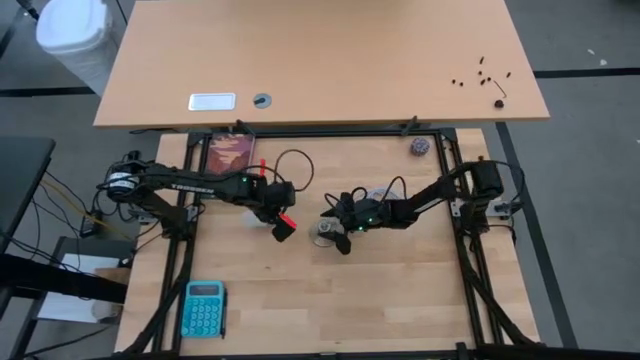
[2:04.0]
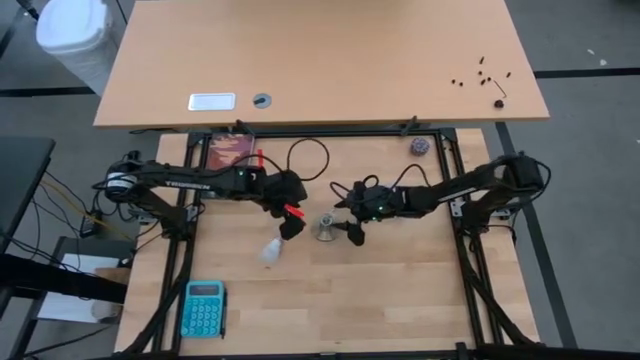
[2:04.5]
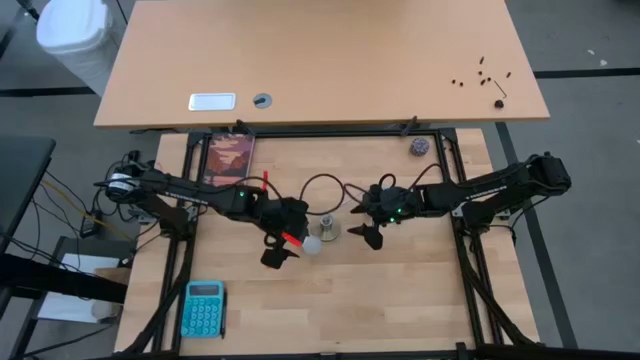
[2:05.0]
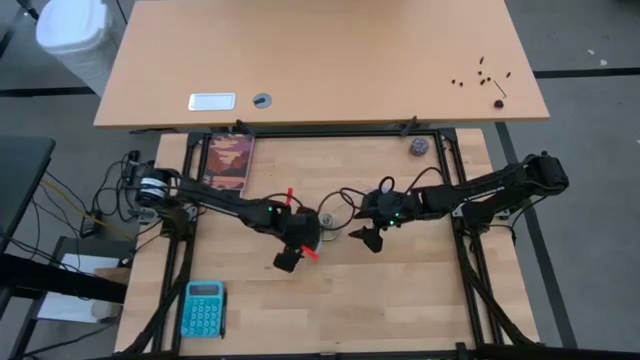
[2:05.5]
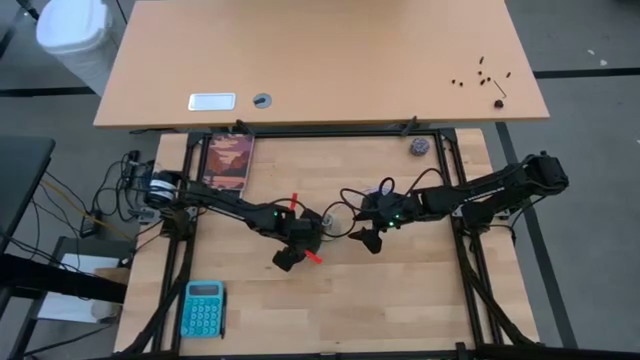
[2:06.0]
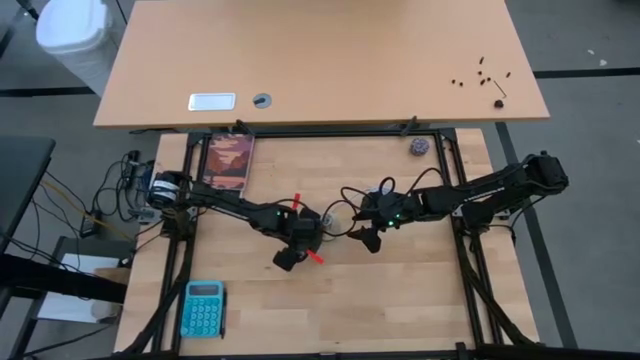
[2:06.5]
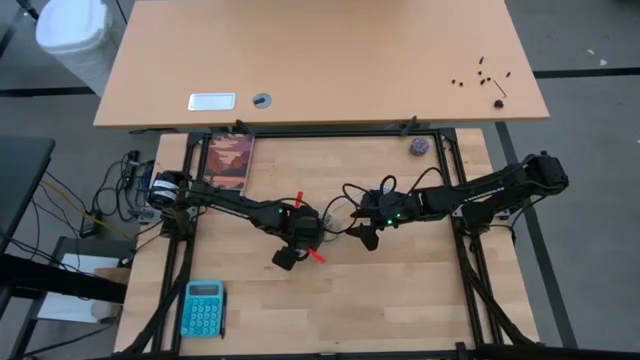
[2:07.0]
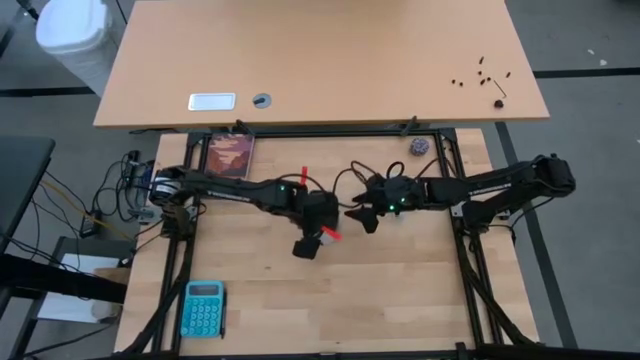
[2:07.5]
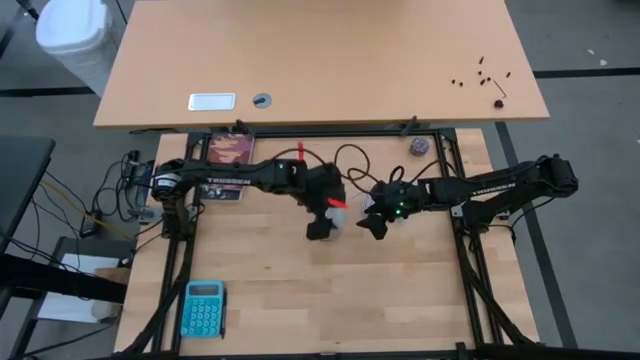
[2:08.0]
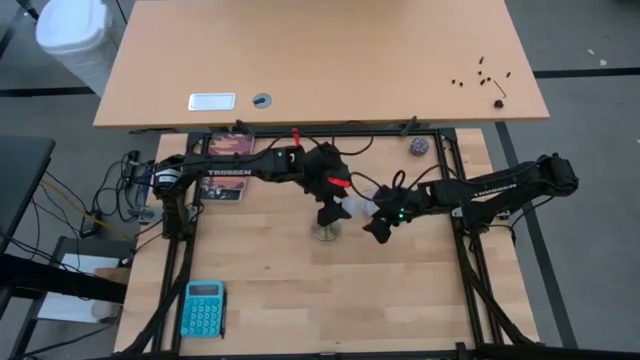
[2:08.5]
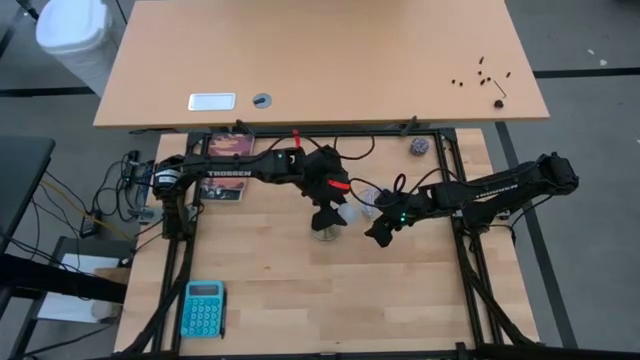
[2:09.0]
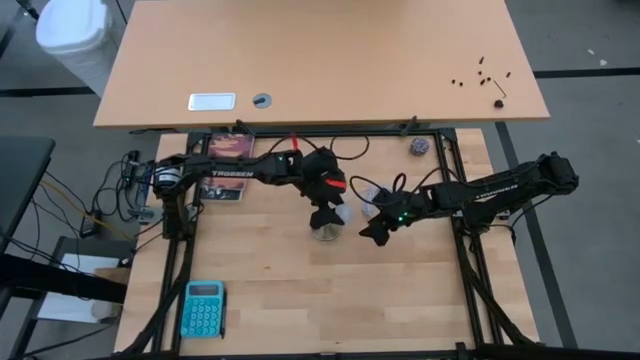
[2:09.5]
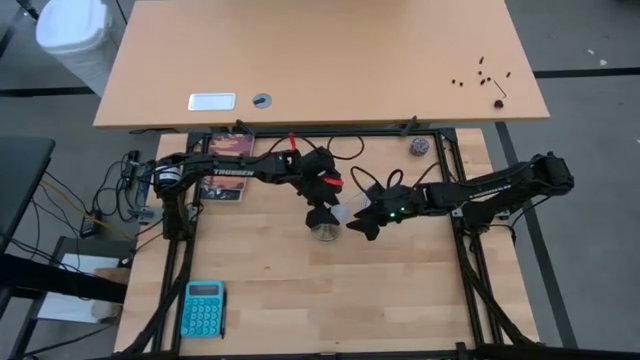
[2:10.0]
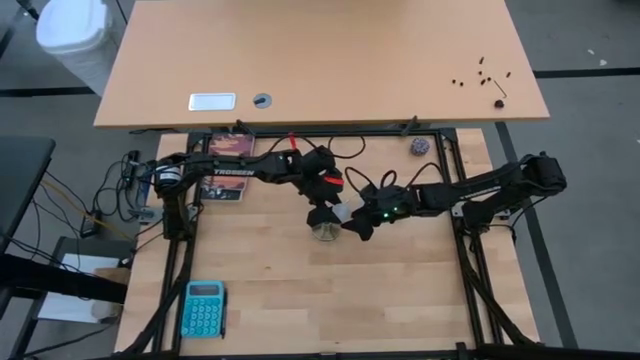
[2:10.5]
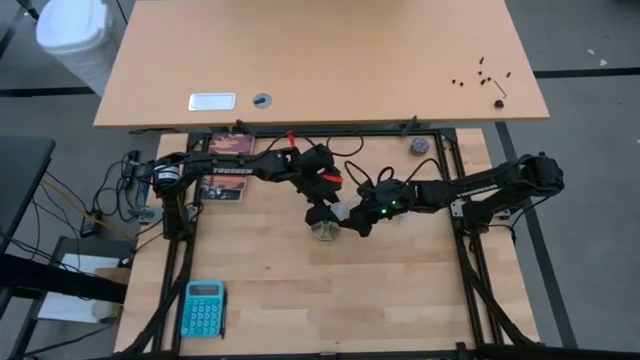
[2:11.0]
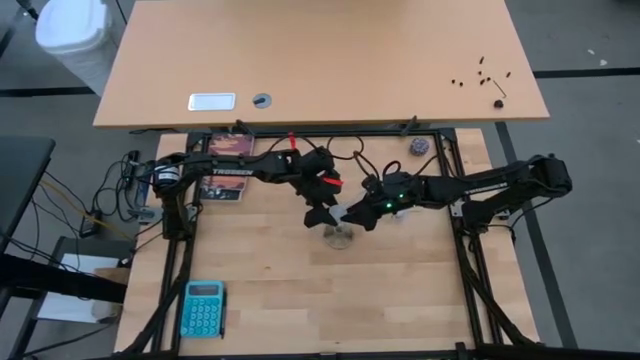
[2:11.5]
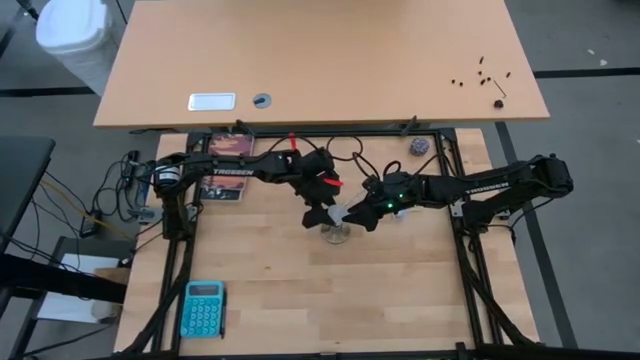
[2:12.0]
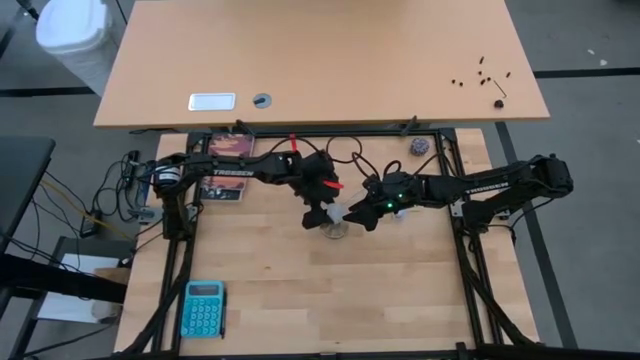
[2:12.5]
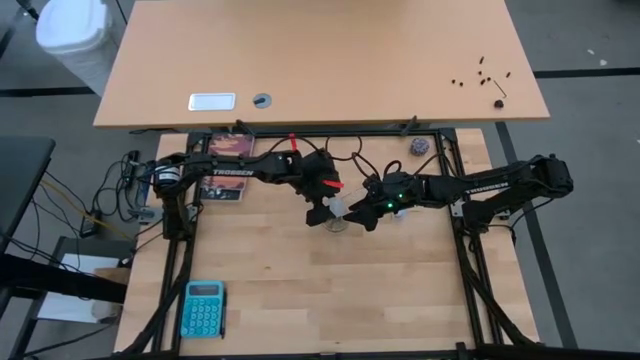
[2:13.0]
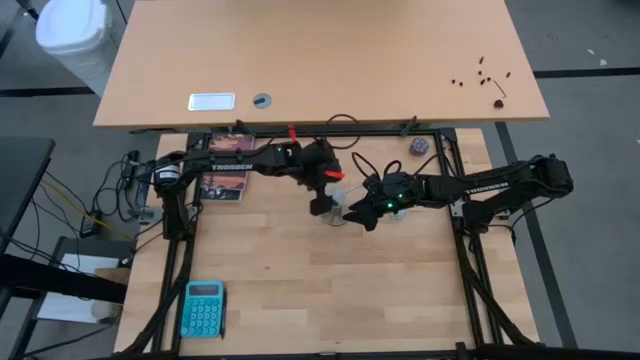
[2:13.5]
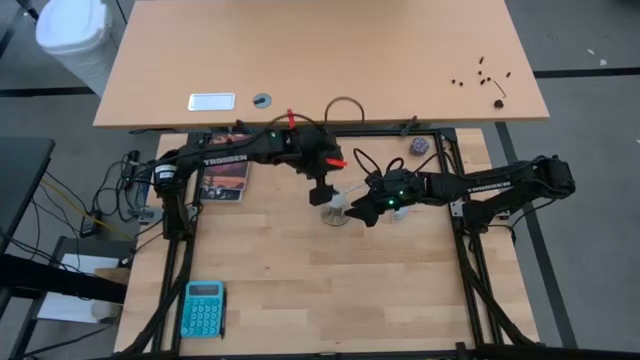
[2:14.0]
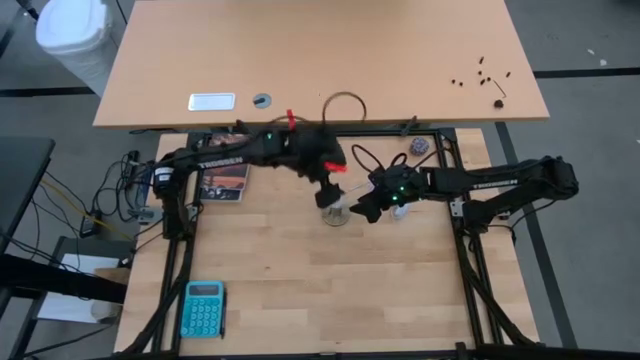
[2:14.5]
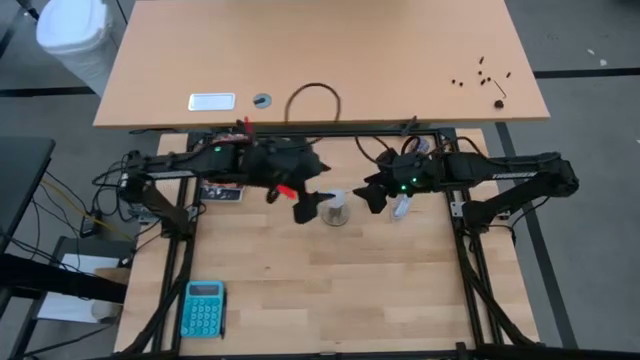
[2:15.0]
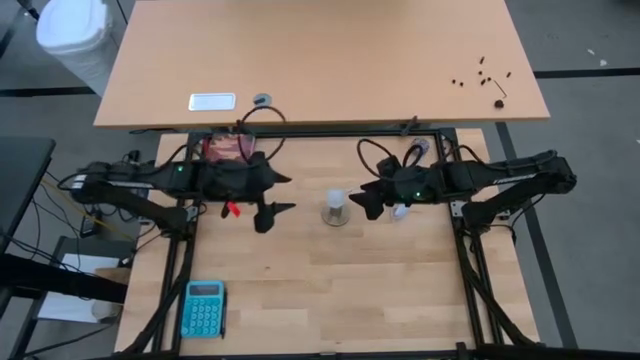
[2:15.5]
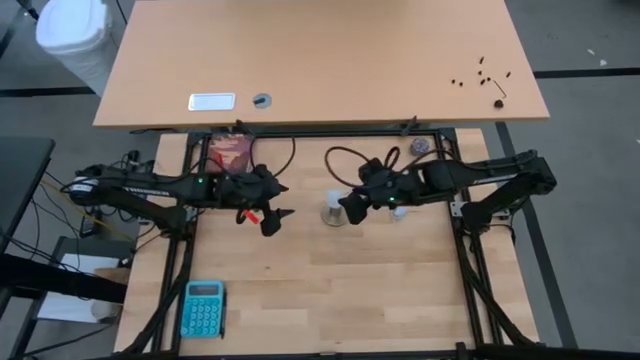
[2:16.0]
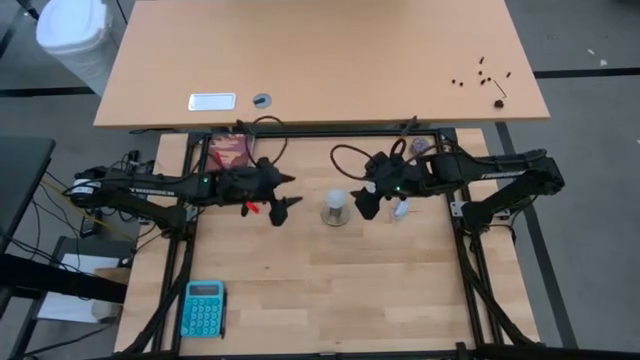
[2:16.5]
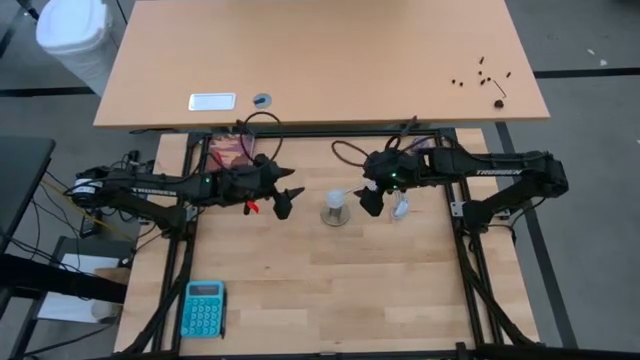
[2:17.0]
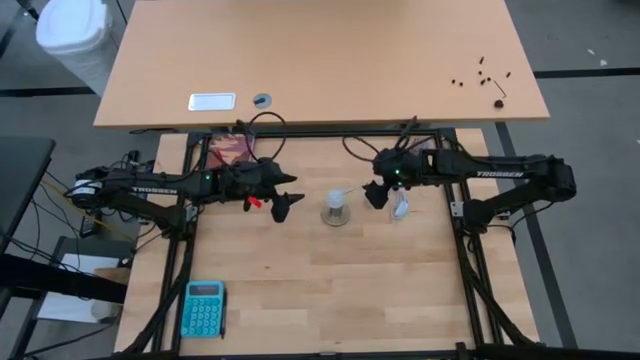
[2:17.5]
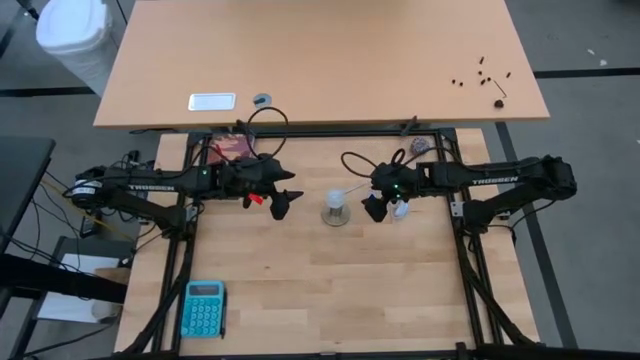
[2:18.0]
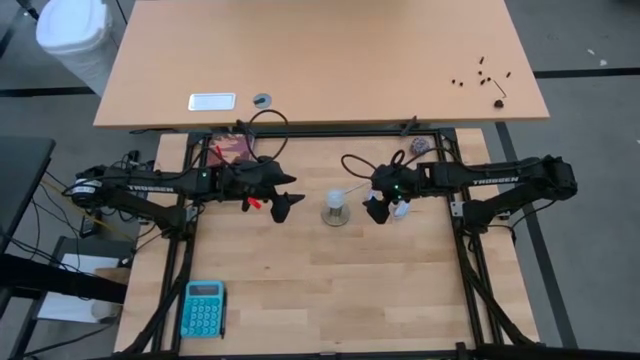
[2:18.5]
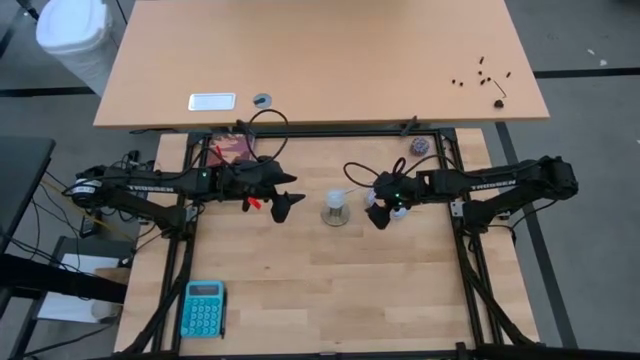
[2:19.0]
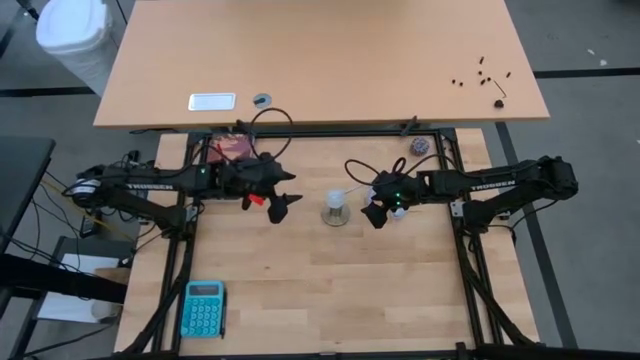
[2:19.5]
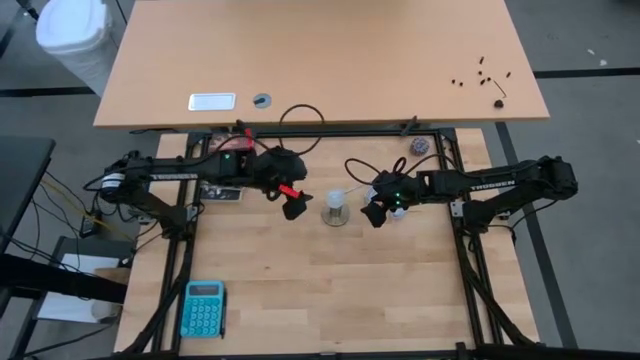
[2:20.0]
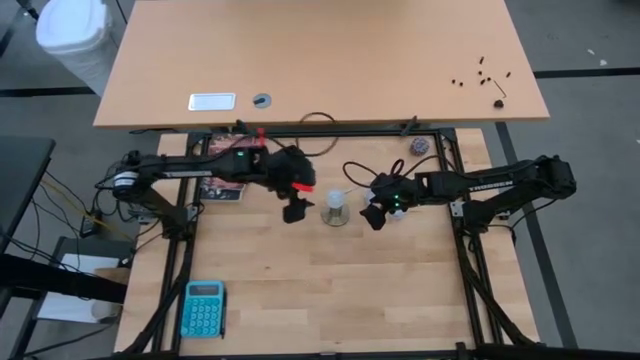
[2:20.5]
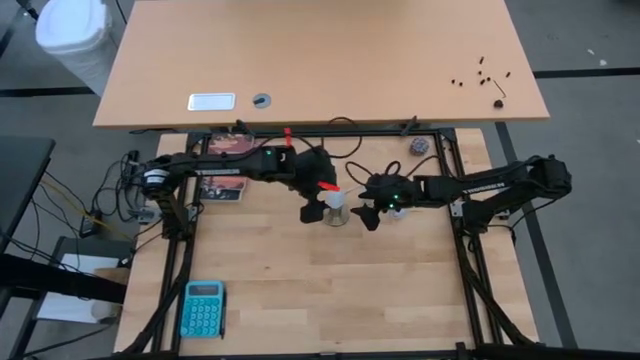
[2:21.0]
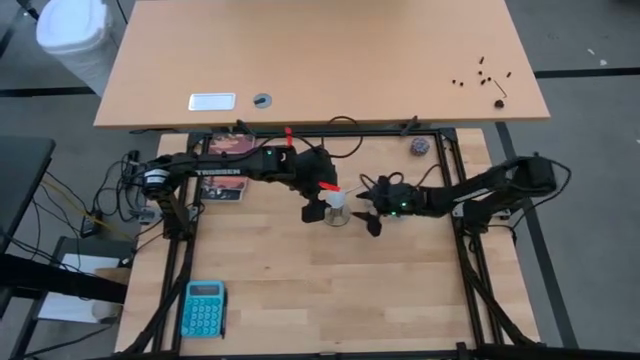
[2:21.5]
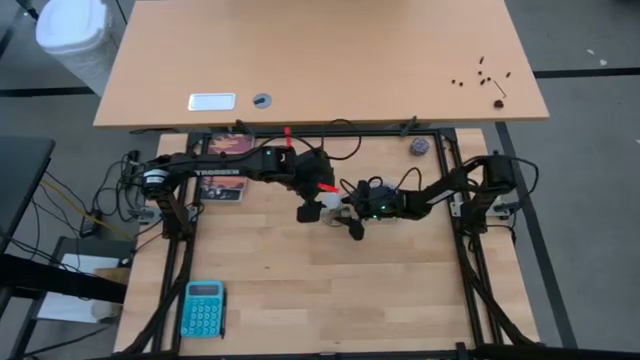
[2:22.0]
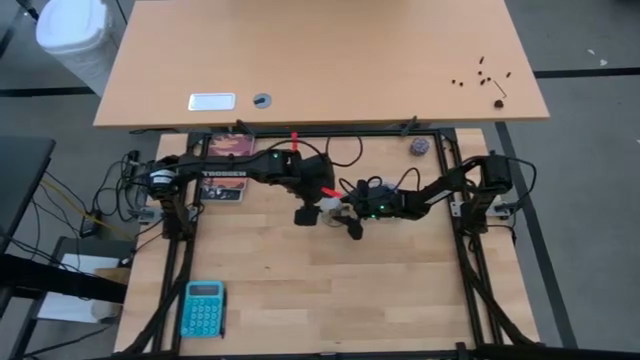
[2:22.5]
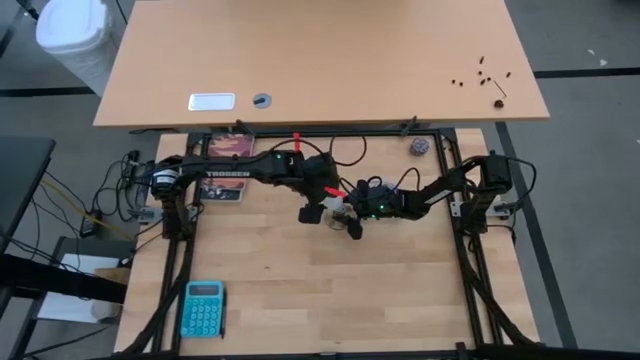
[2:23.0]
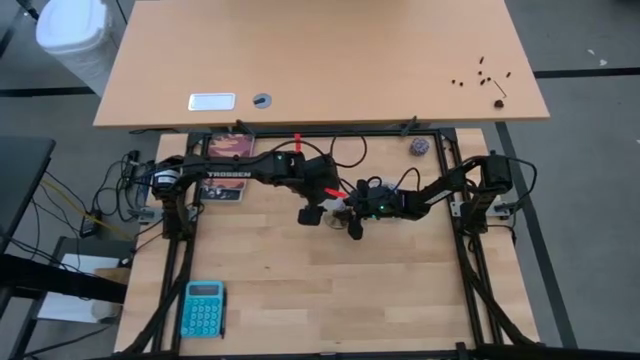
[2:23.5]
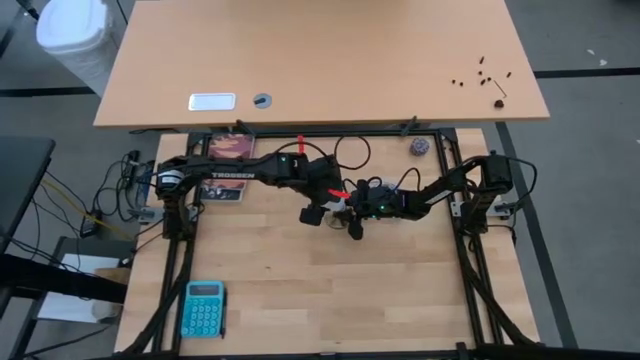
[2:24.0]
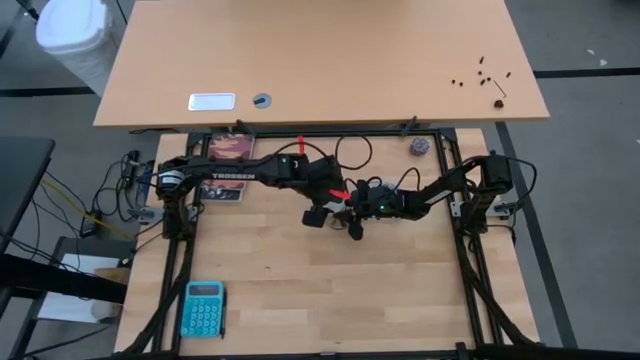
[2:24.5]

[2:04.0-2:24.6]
Task: Screw lightbulb
Insert the lightbulb into the desk lamp
